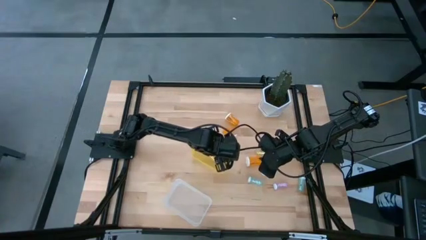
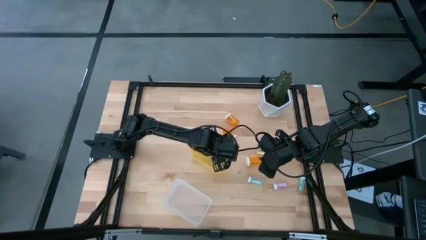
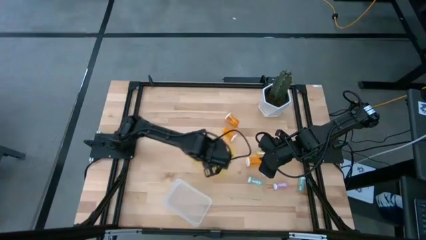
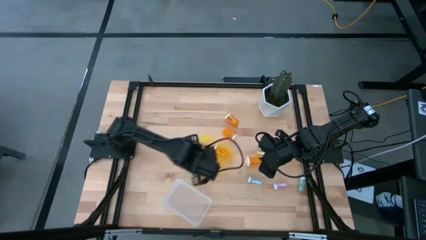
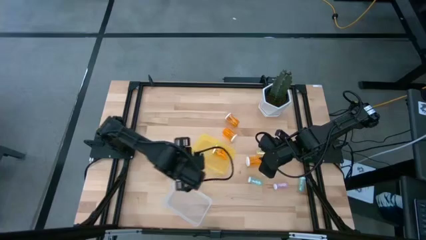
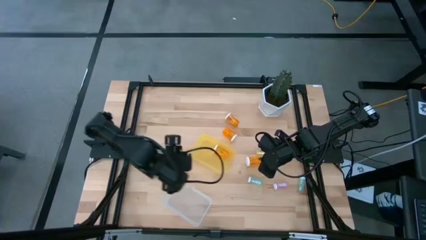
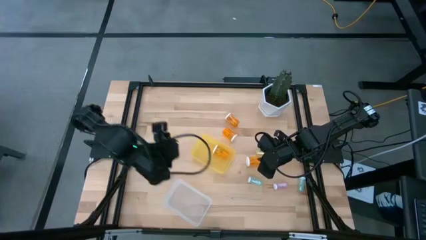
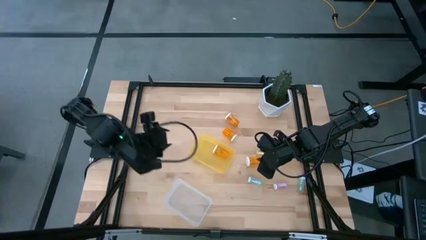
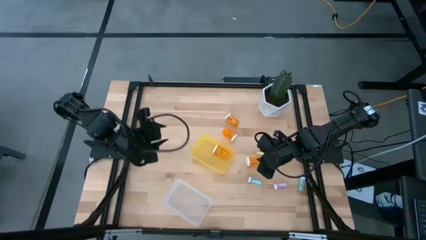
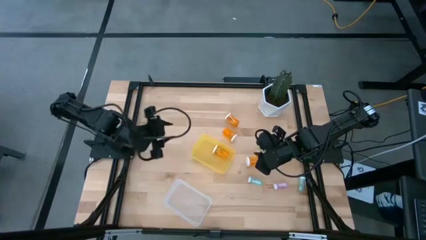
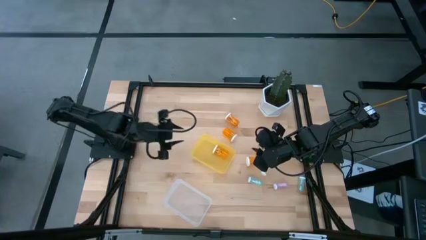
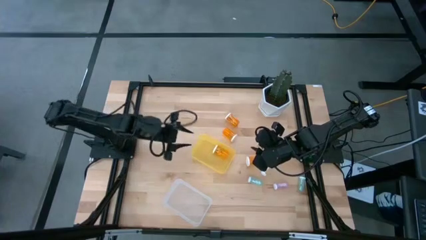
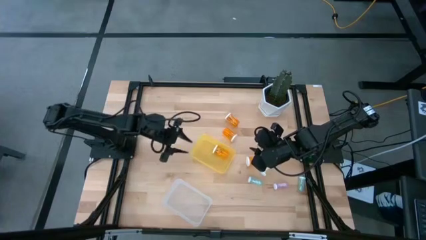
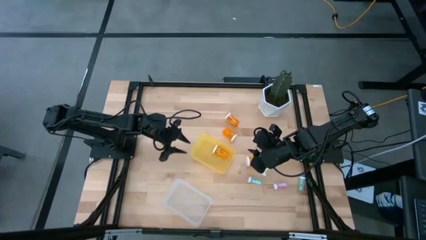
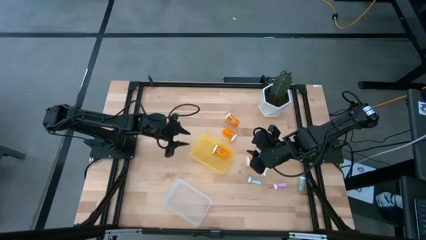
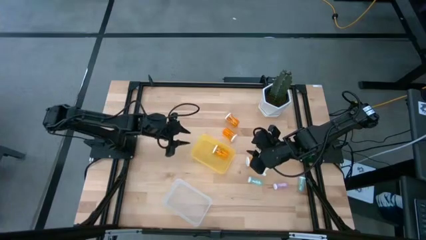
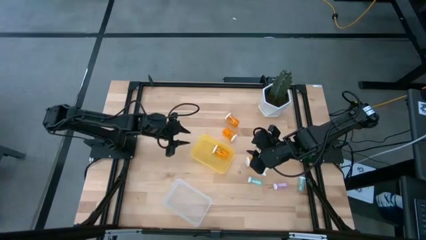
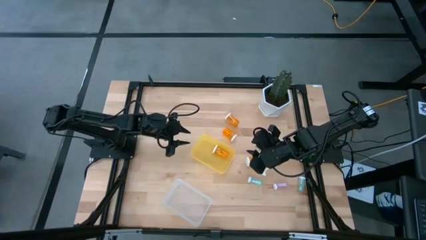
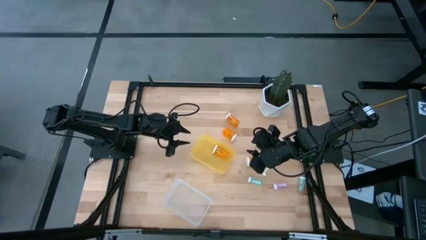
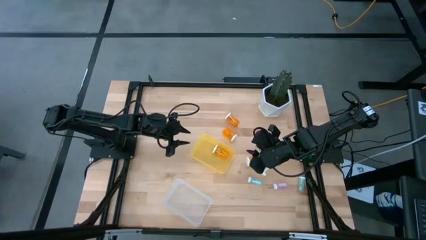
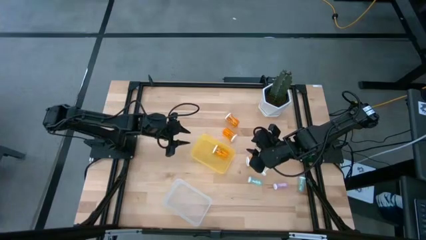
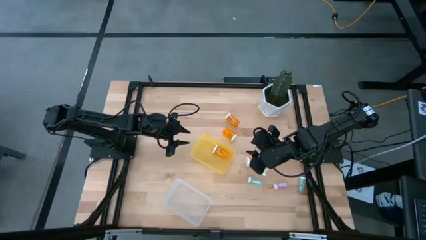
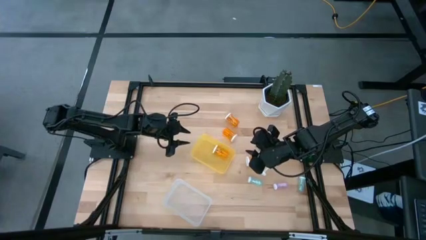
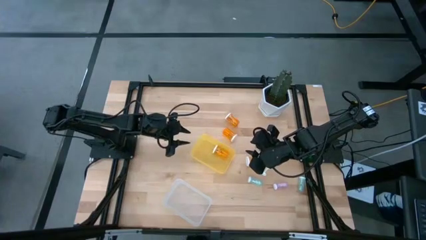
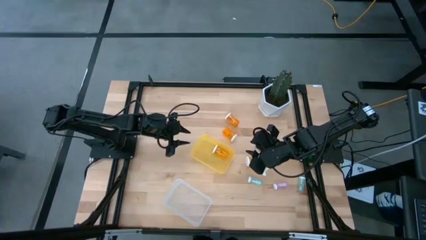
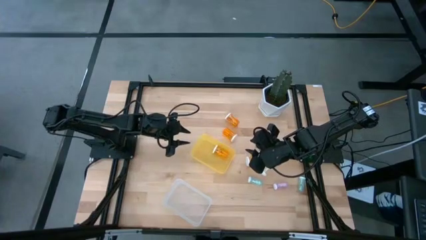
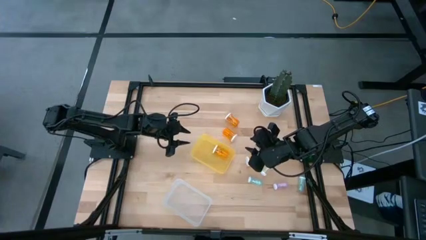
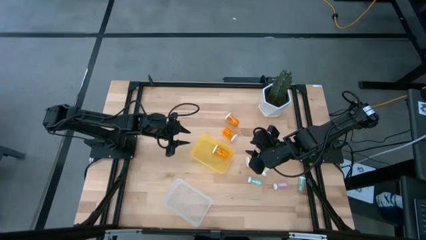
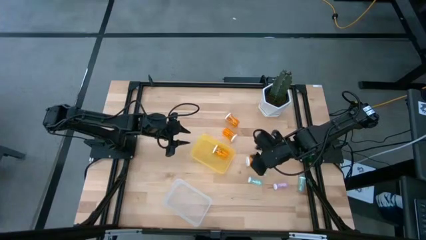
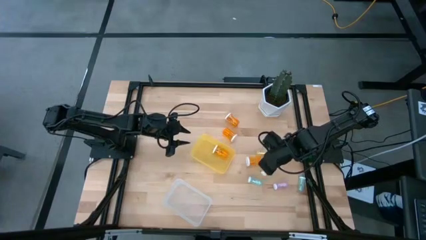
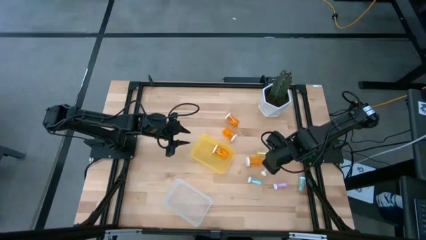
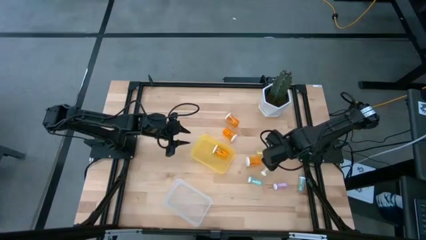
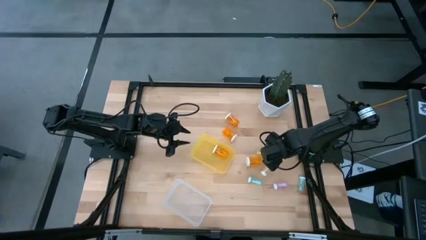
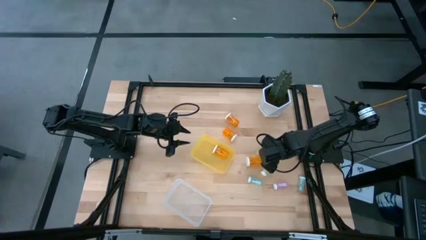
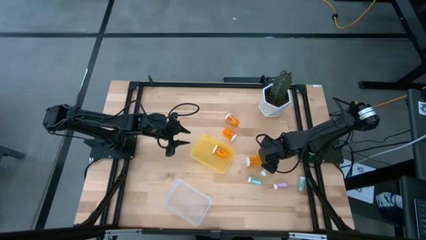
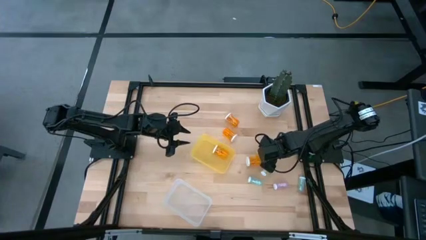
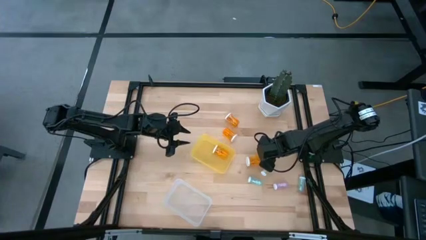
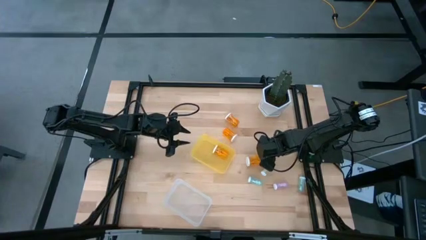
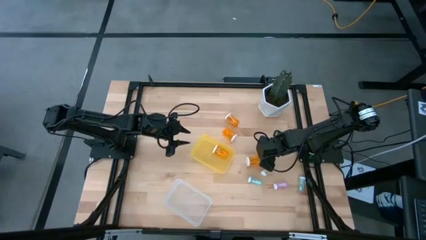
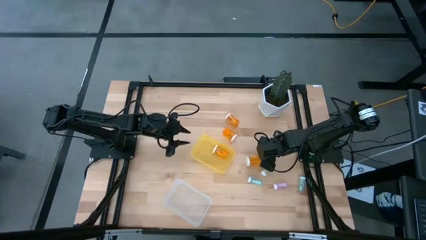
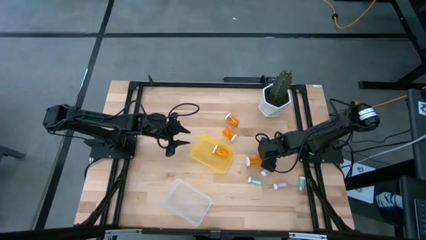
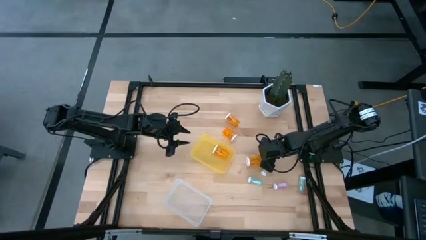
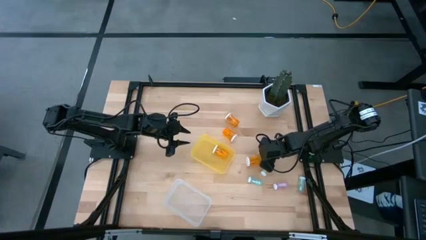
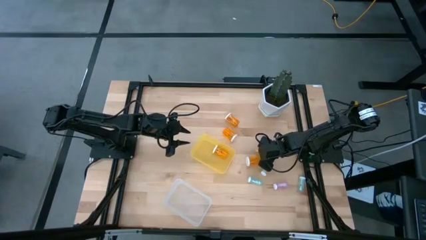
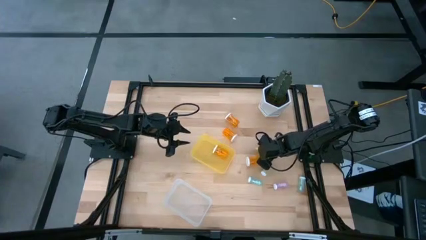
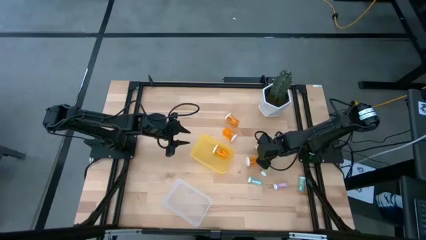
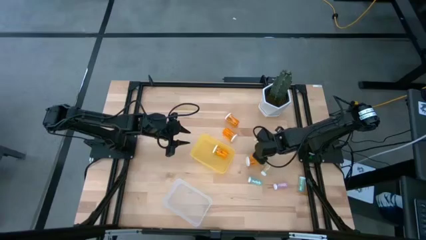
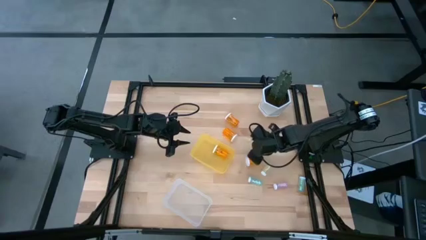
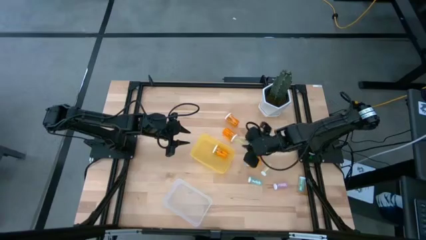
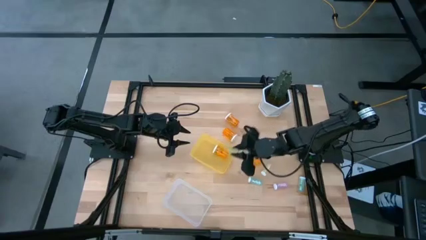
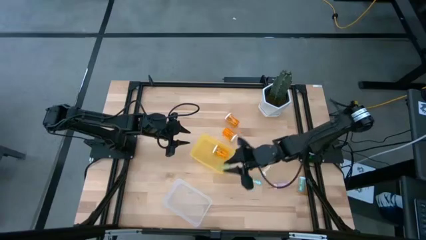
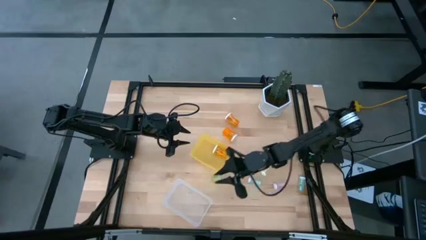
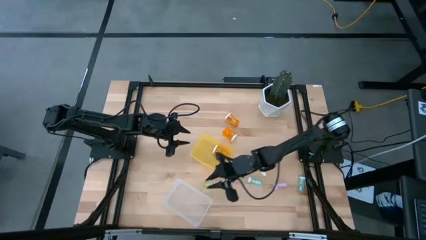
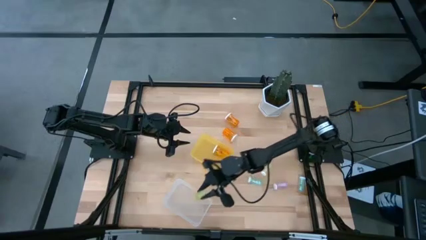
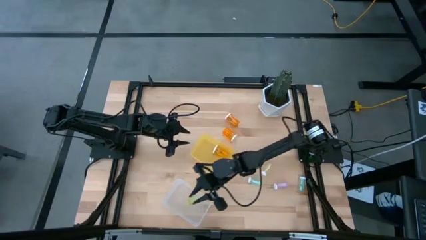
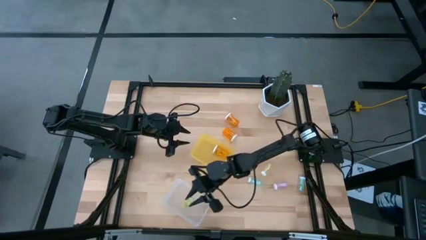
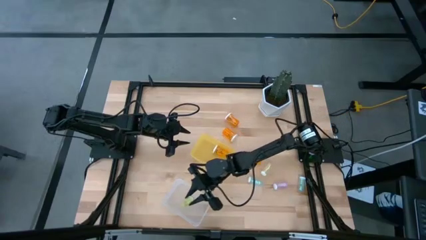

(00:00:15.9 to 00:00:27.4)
Task: Pick and place medicine bottles into bin by pill shape (circle, oval)
Put the yellow bottled tablet into the transparent bin

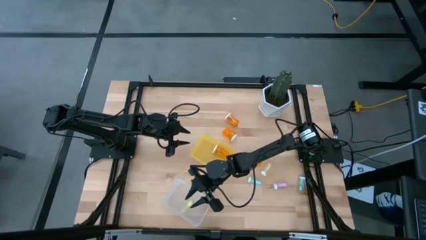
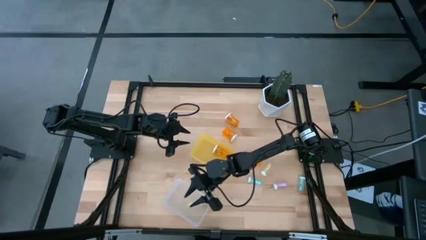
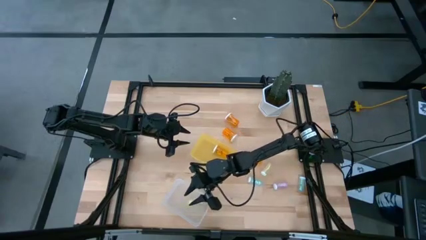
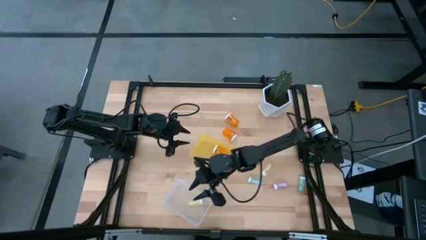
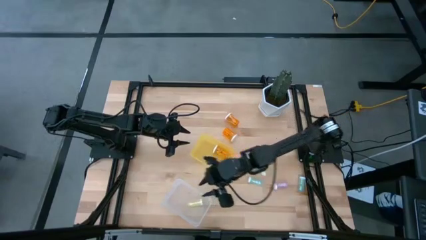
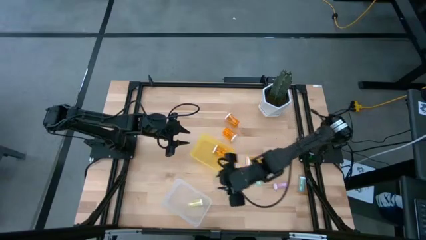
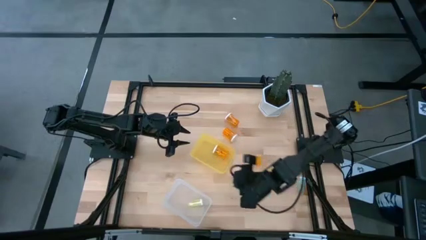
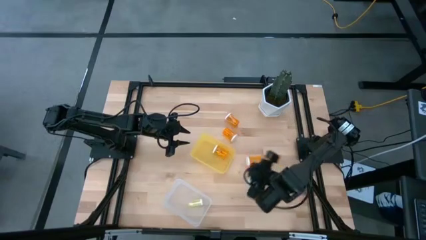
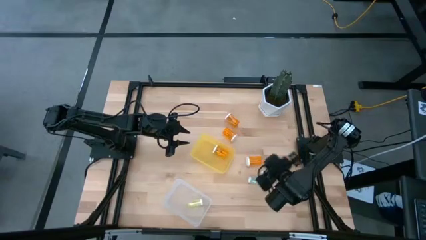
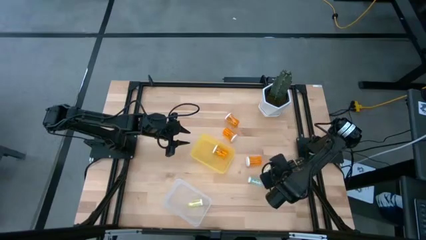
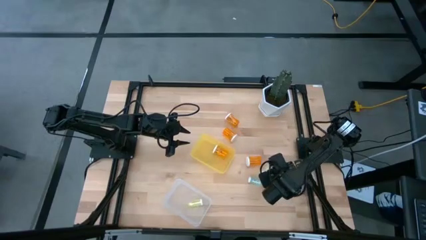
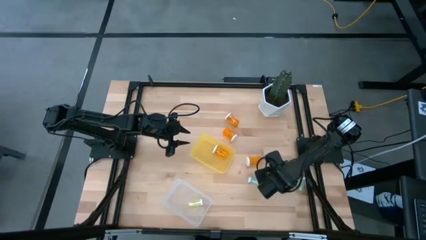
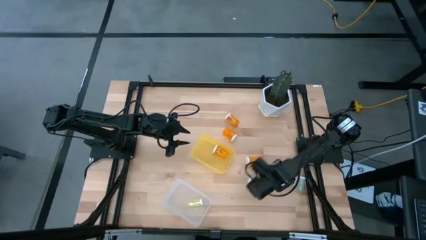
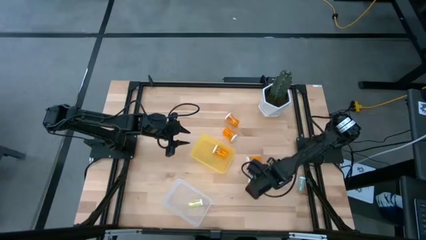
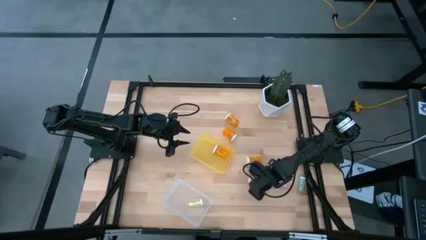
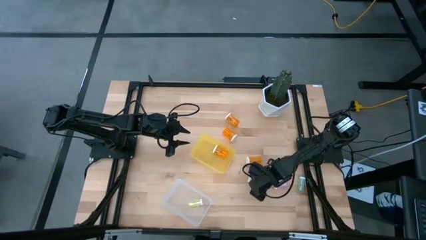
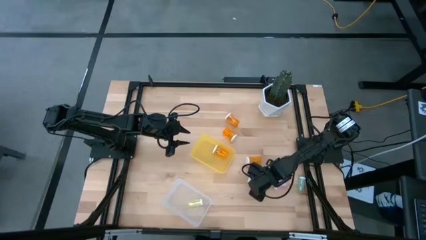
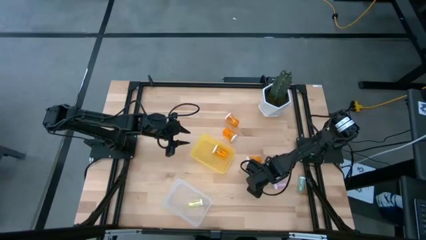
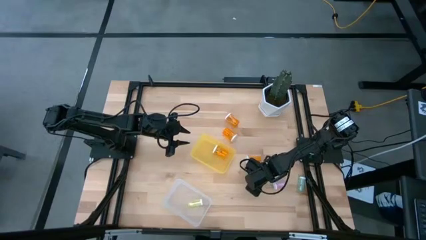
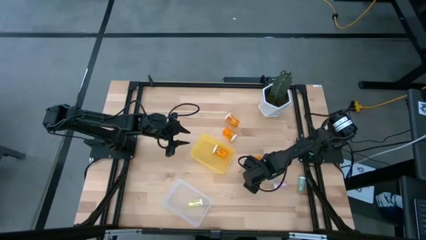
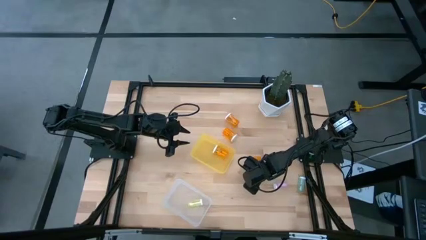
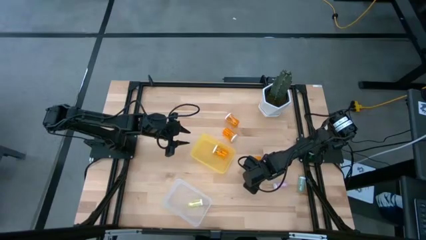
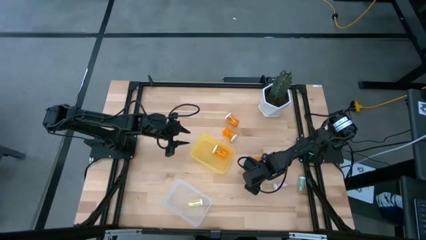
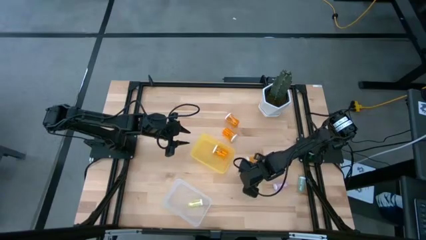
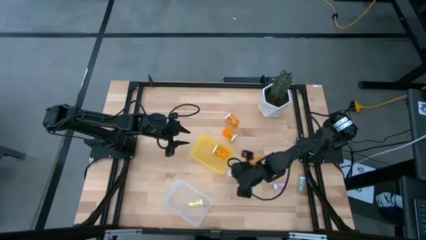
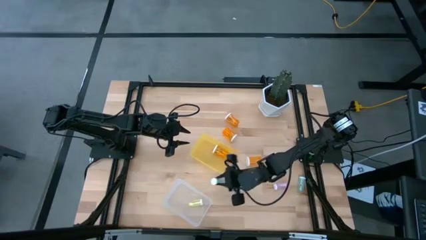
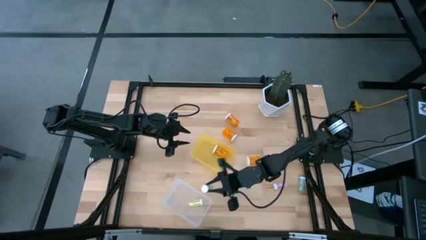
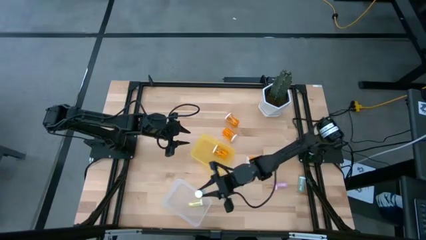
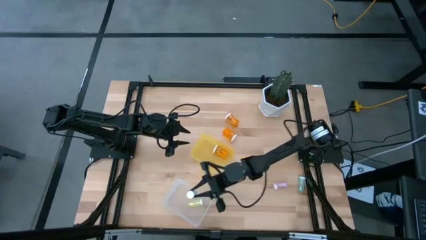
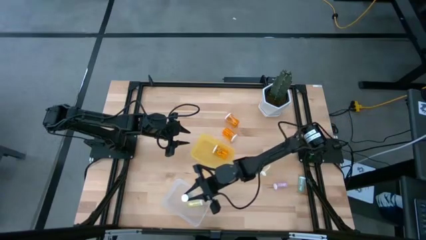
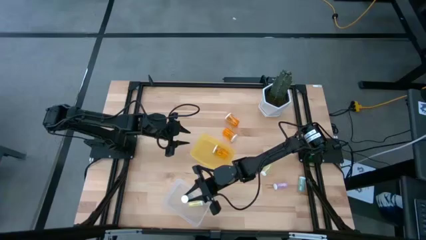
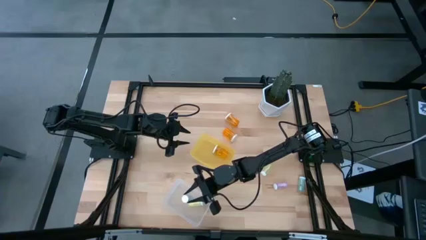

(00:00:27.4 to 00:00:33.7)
Put the green bottled tablet into the transparent bin
